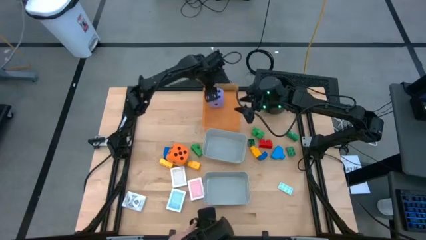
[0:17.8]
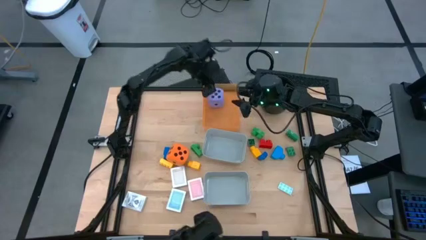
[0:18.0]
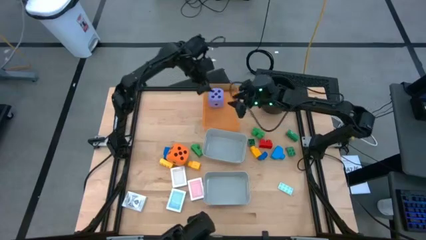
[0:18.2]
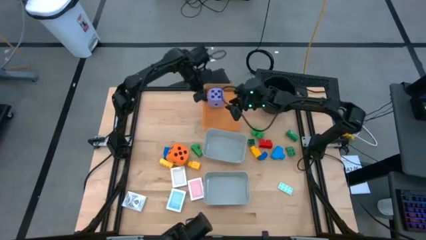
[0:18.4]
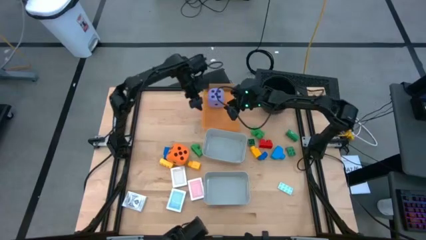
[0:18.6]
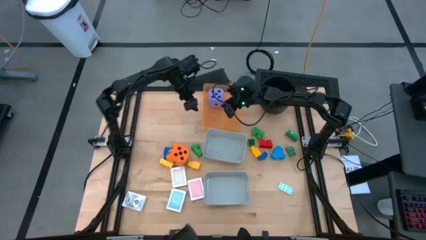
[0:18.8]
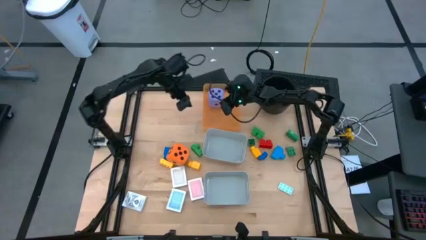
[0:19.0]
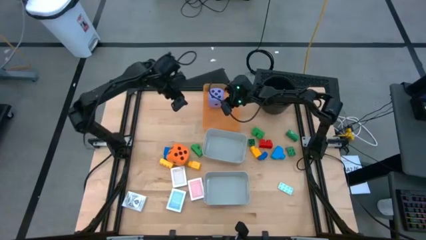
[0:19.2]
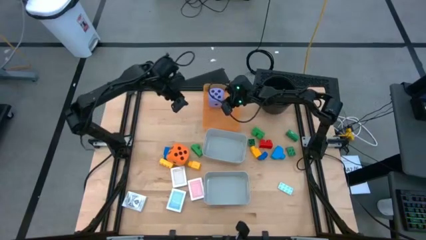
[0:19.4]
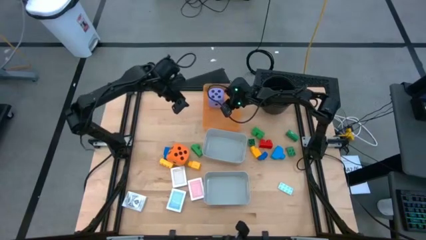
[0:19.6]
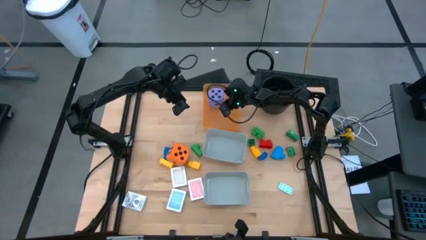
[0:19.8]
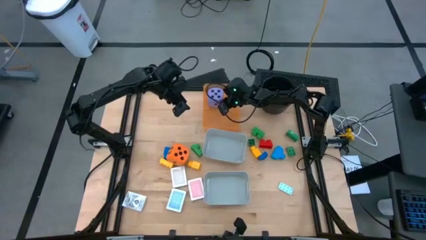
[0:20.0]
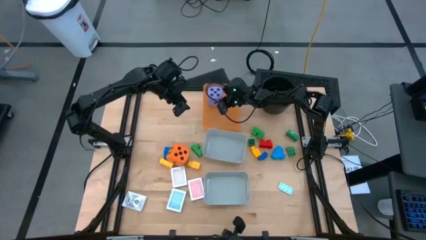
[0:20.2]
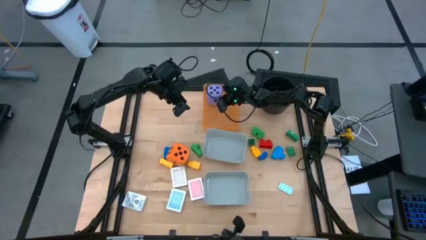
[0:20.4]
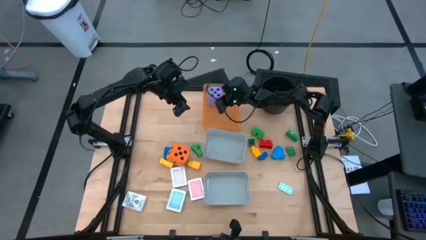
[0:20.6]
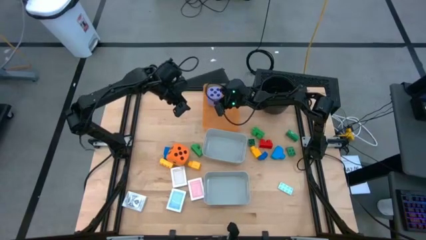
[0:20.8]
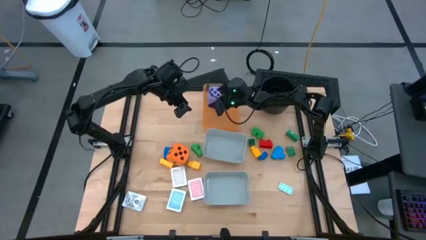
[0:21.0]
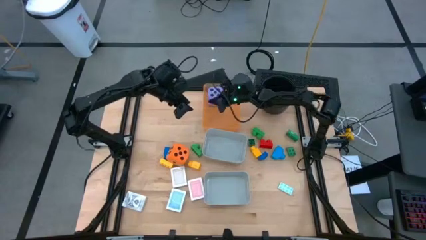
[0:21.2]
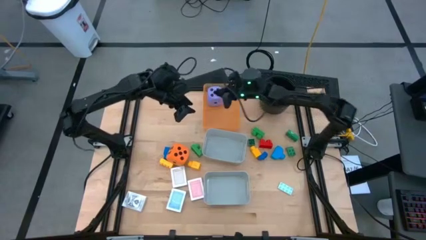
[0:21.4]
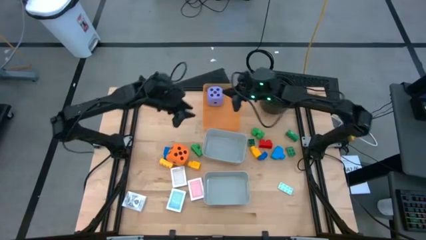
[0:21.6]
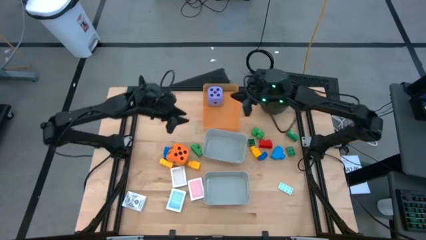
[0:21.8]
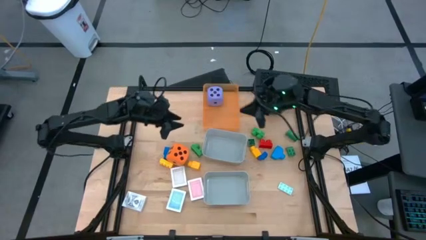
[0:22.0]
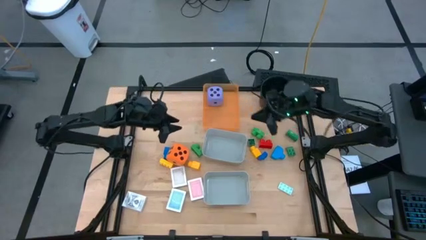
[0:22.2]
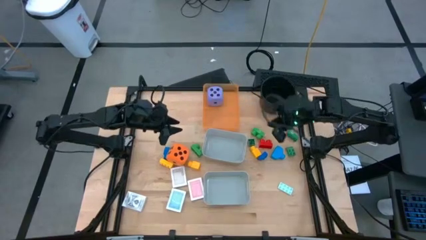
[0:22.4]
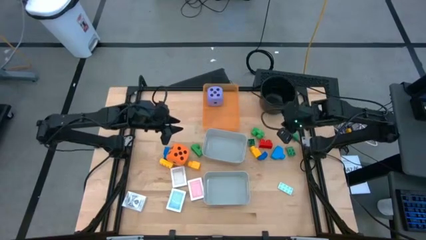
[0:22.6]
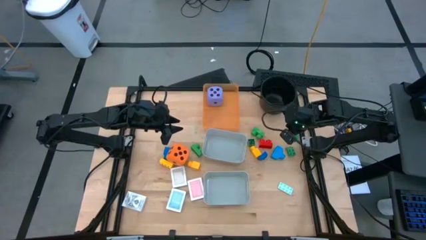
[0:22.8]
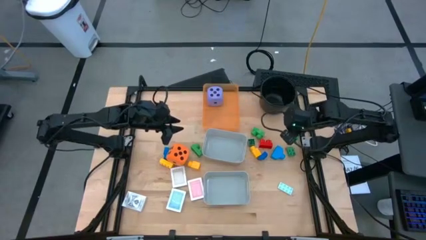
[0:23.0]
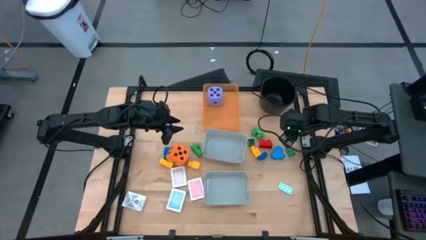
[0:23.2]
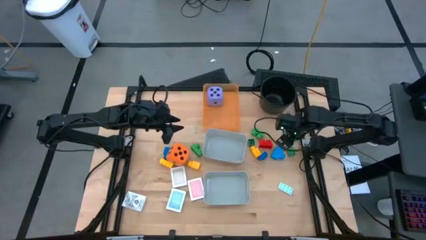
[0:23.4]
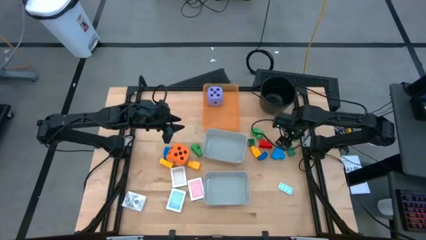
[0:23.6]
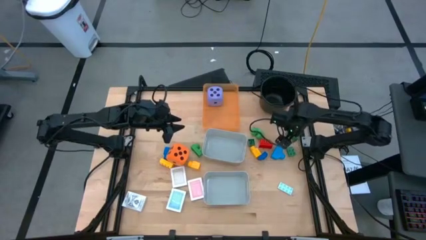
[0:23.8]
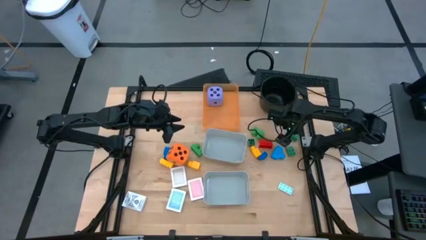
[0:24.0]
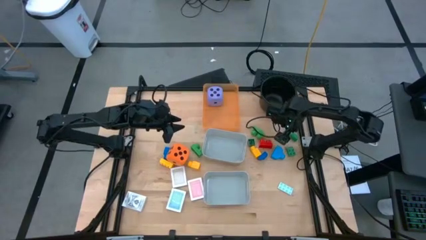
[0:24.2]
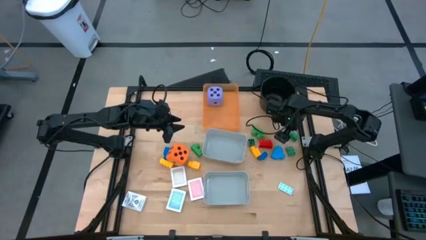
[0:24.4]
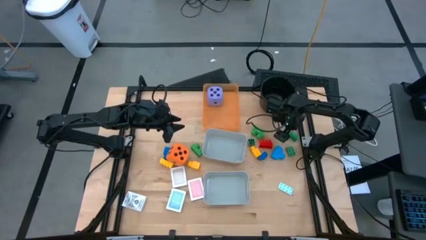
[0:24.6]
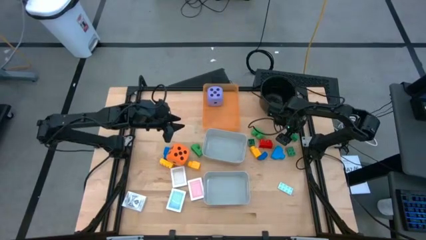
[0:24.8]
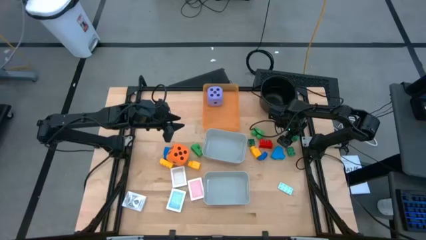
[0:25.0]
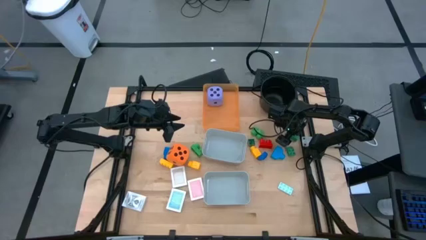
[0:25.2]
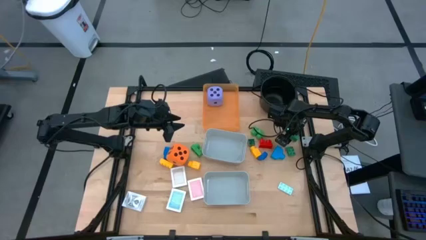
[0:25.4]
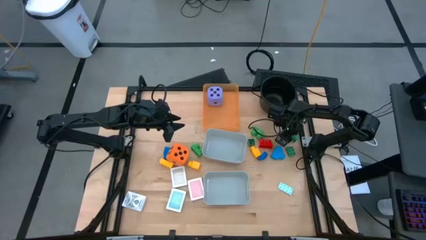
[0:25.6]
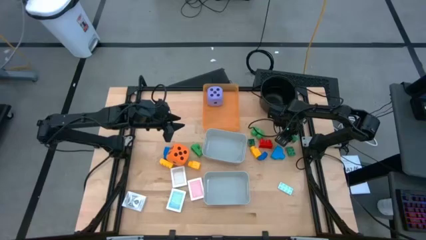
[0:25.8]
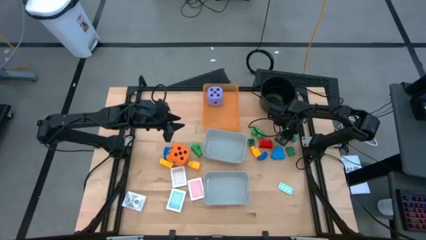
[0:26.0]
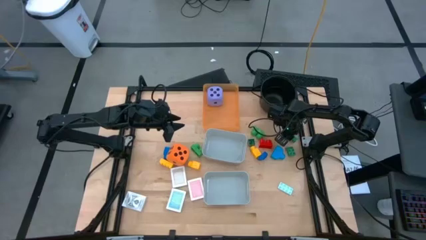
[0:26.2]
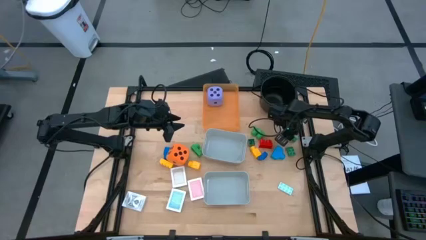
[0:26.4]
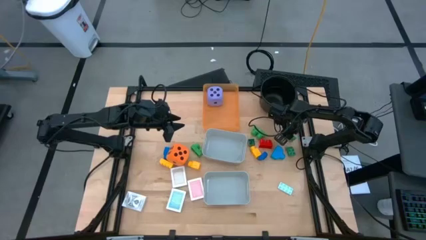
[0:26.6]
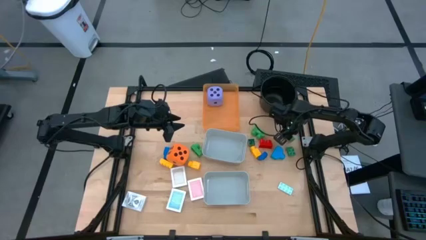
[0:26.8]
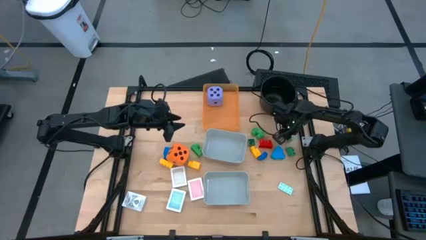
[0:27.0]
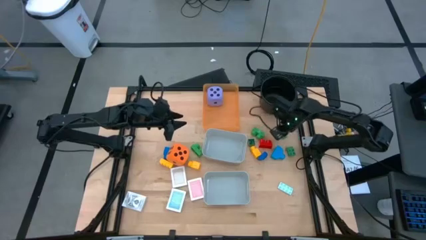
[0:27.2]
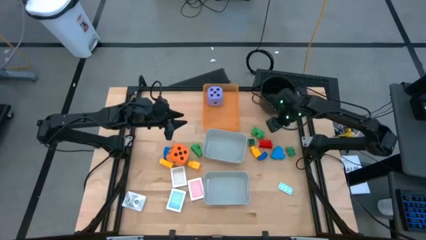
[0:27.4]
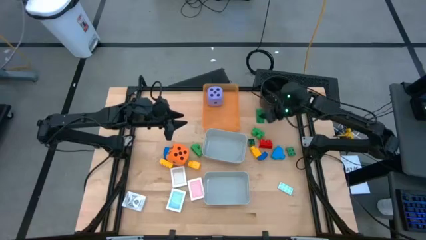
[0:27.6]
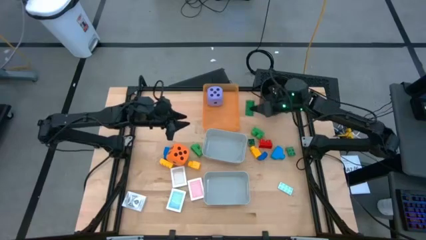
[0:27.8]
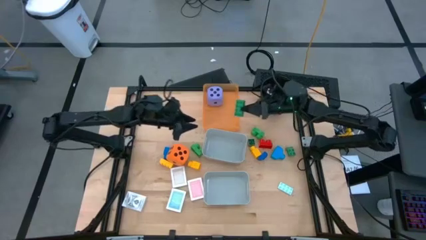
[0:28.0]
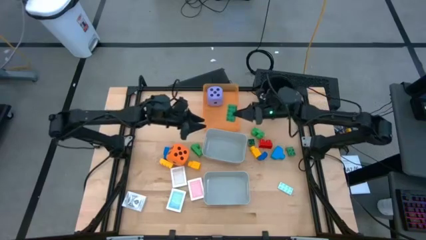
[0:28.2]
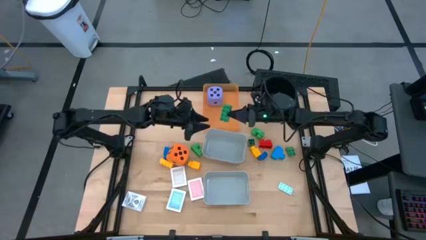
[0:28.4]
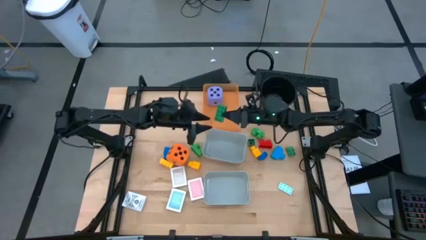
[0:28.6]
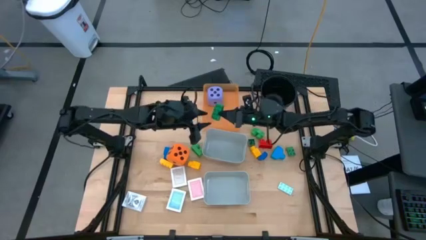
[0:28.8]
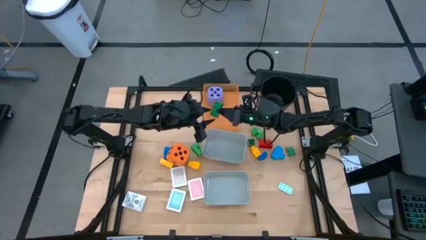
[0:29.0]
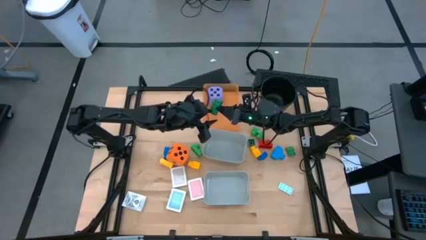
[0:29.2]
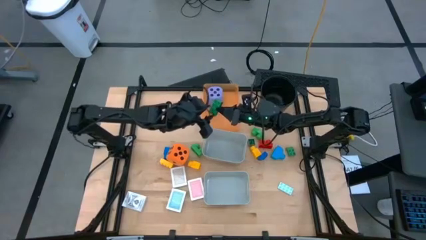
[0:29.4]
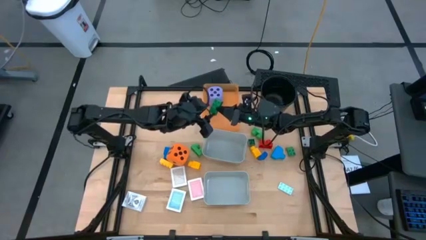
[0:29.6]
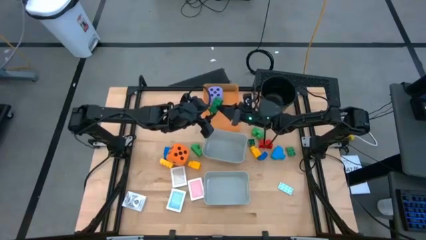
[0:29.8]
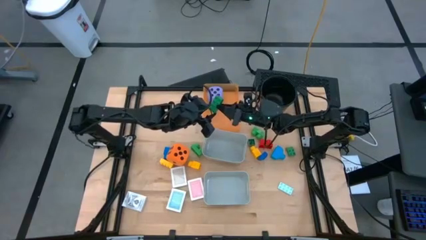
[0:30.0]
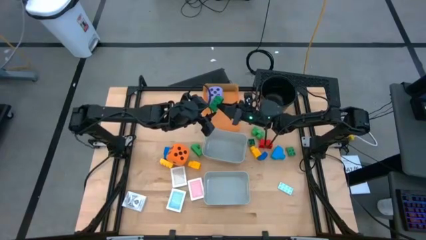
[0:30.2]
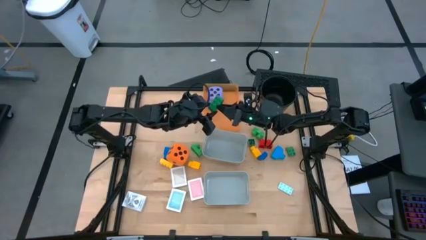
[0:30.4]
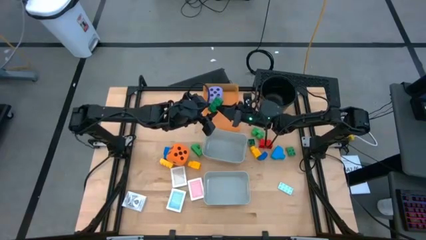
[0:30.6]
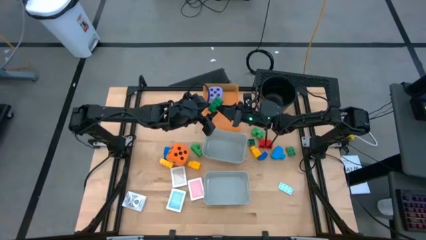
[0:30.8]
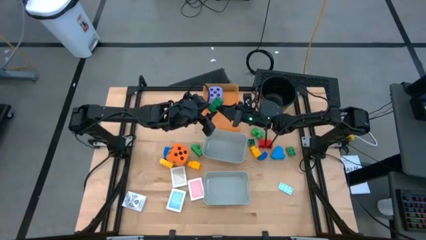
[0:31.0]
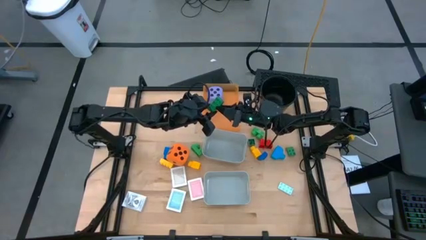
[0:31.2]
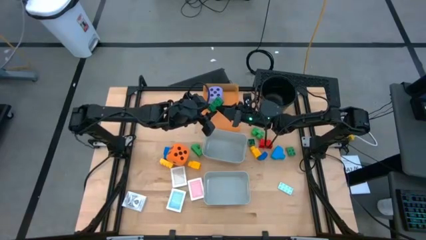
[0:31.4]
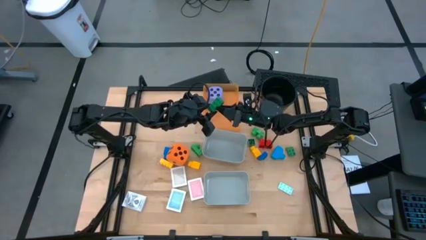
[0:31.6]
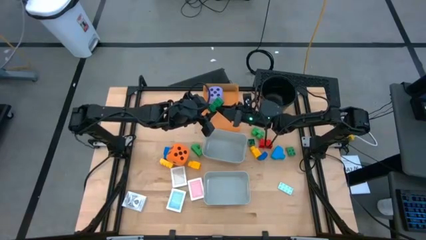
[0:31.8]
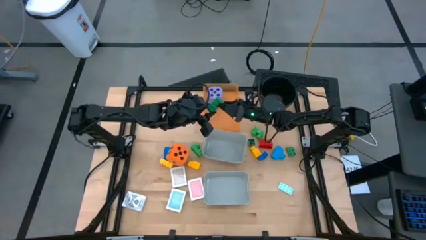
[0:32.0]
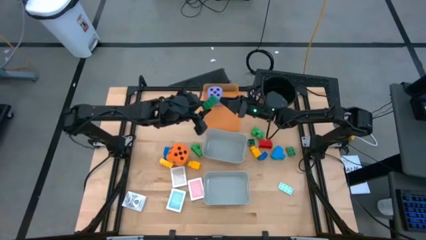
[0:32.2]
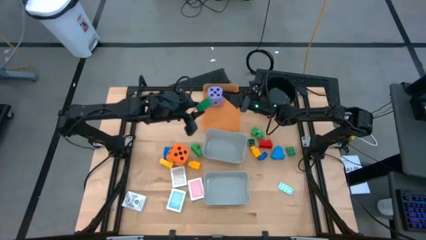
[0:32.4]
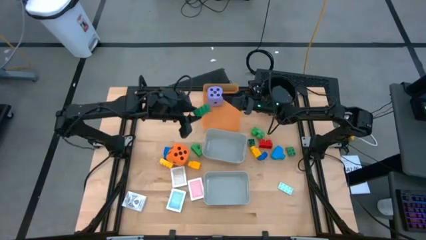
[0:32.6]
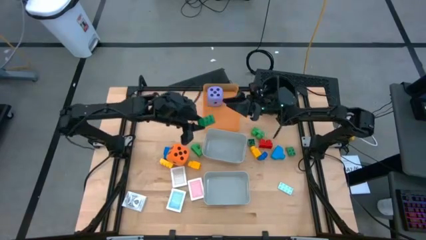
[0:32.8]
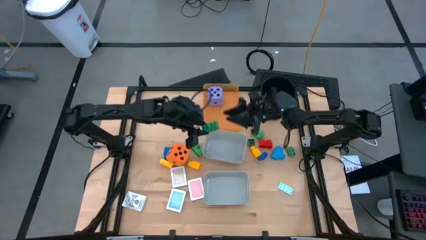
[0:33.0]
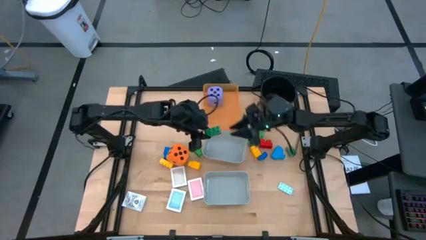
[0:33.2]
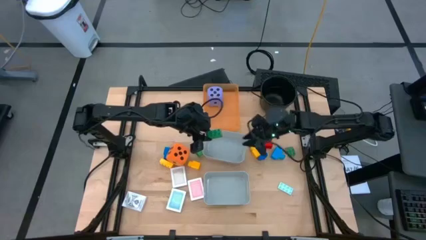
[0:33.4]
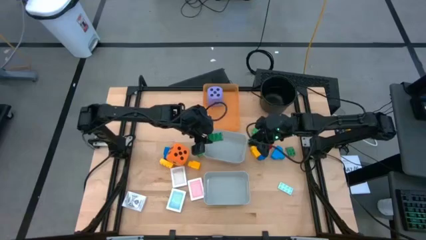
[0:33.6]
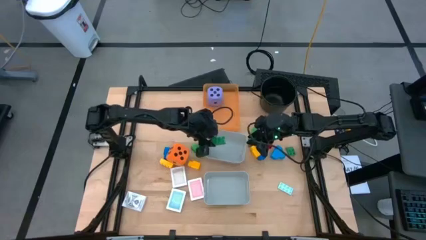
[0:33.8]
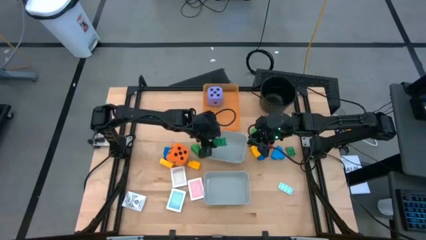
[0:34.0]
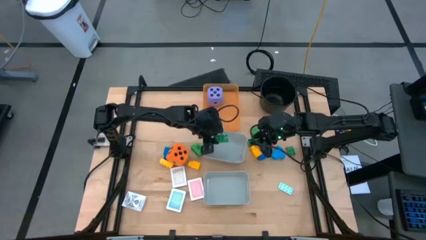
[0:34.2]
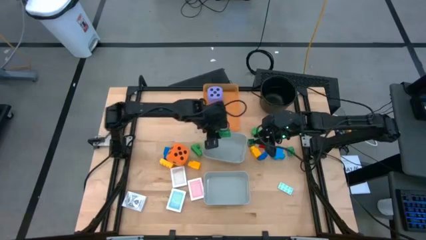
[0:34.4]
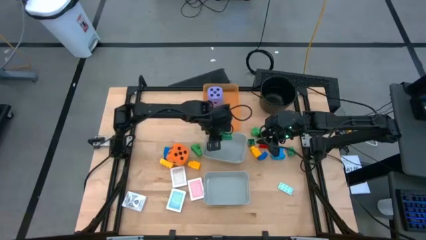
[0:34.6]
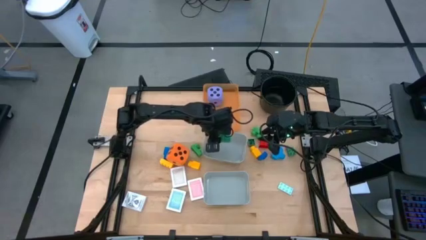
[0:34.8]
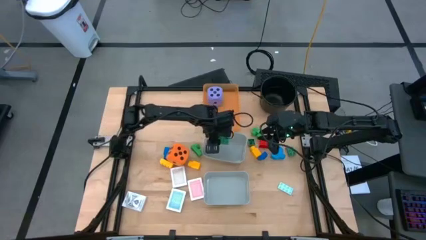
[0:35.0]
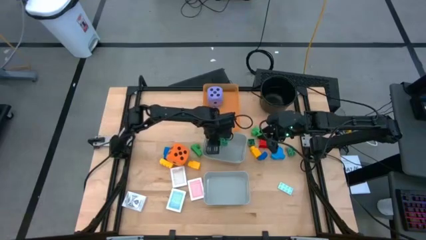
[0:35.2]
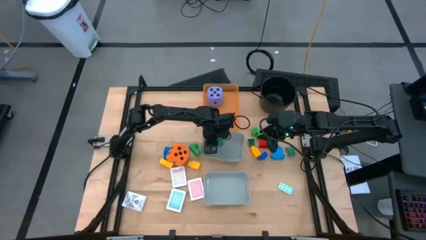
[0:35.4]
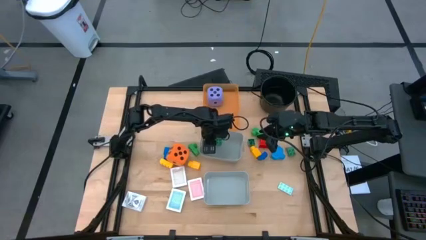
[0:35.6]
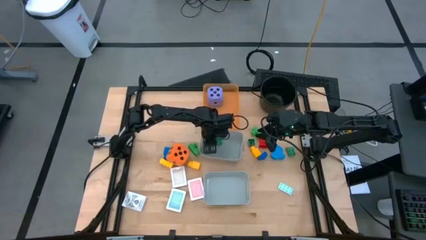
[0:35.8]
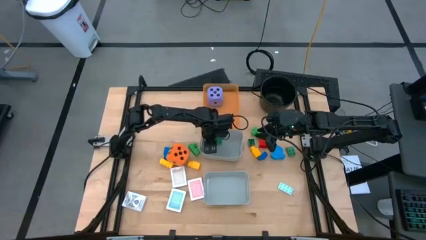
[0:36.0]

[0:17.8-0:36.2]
Task: Pick & Place Toys
Put the green game piece into the top gray bin
